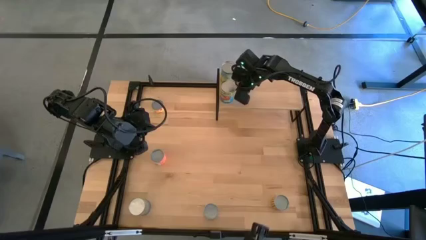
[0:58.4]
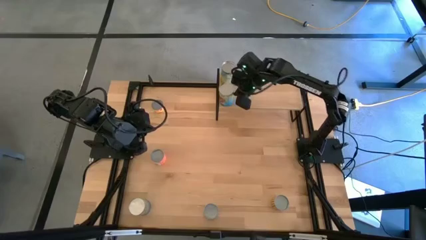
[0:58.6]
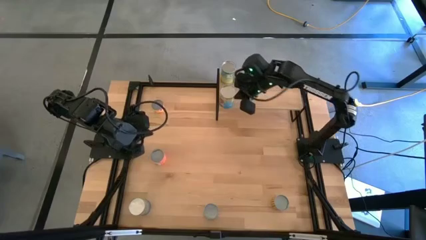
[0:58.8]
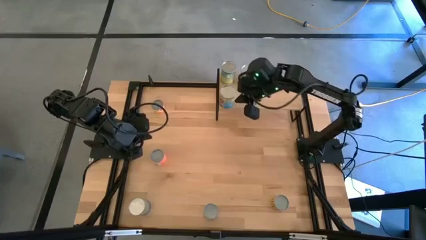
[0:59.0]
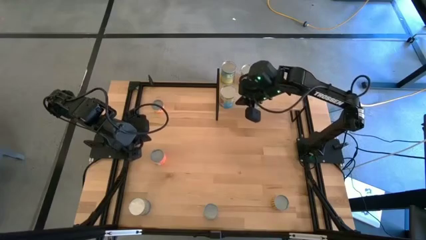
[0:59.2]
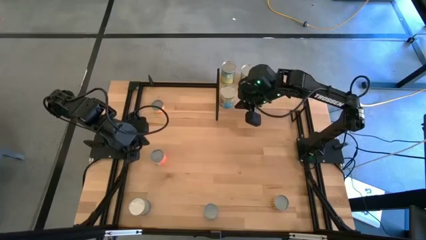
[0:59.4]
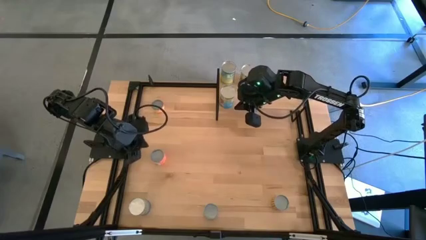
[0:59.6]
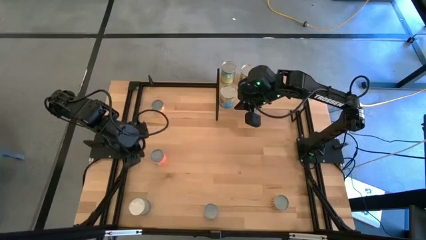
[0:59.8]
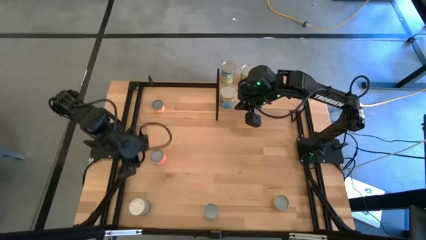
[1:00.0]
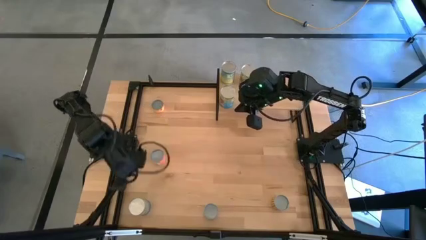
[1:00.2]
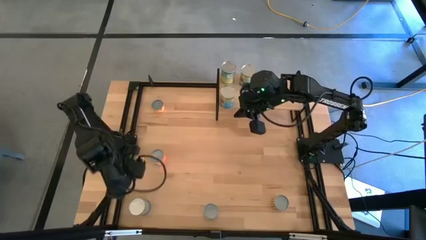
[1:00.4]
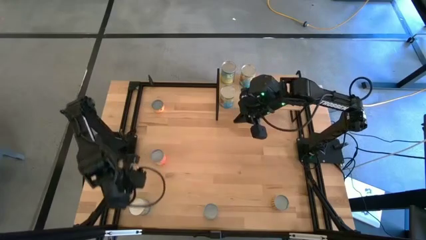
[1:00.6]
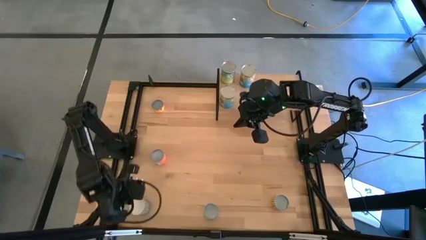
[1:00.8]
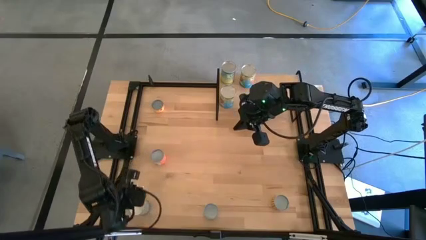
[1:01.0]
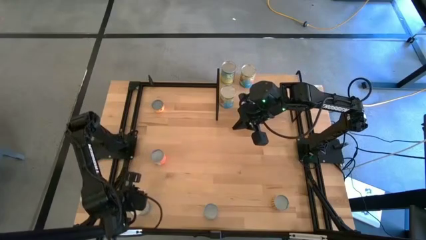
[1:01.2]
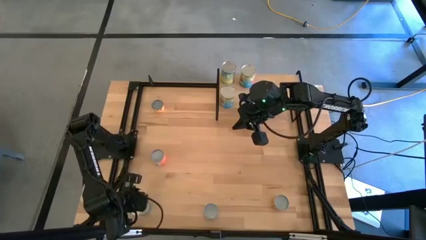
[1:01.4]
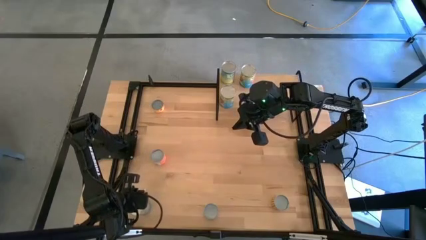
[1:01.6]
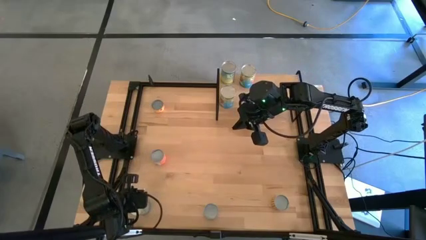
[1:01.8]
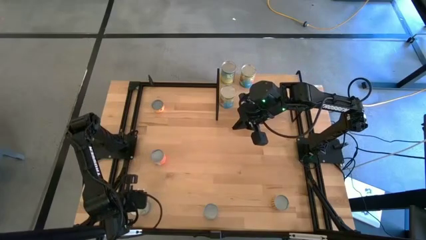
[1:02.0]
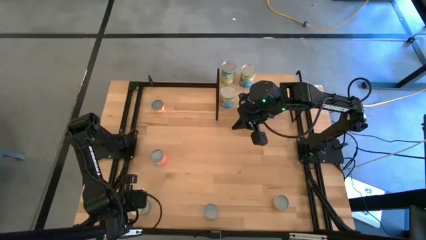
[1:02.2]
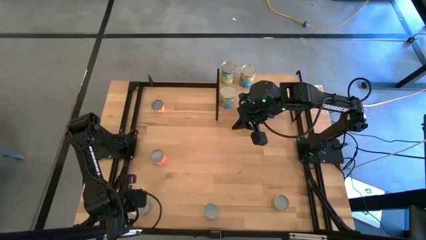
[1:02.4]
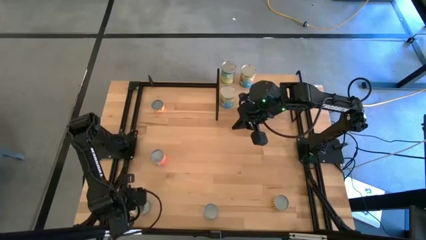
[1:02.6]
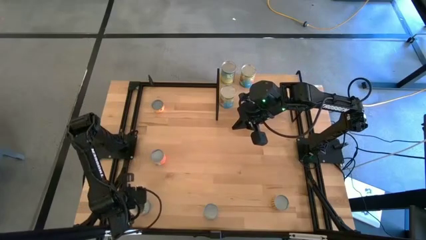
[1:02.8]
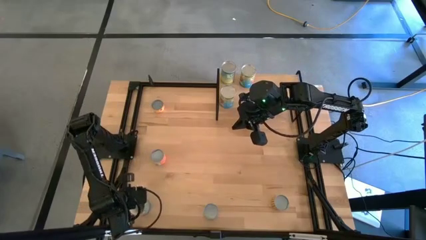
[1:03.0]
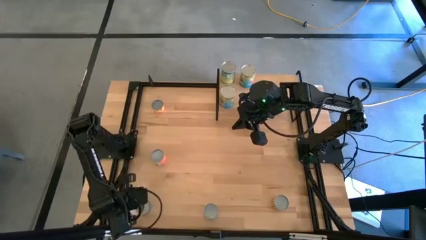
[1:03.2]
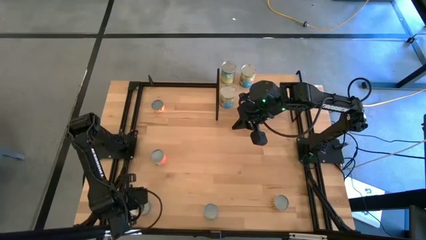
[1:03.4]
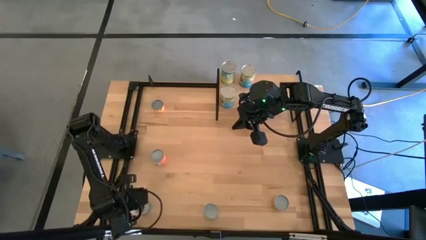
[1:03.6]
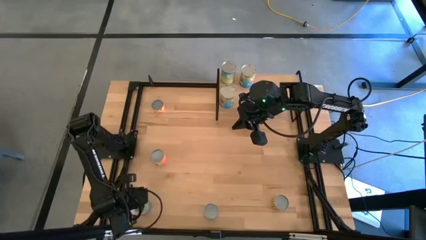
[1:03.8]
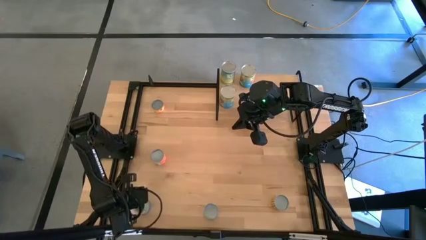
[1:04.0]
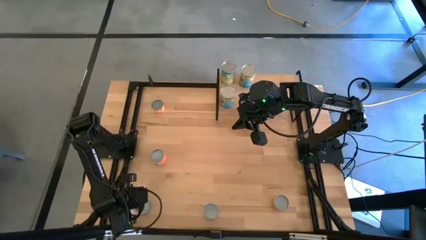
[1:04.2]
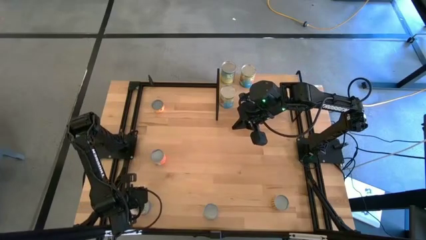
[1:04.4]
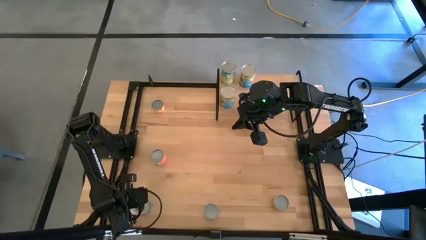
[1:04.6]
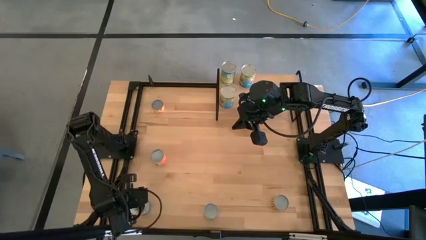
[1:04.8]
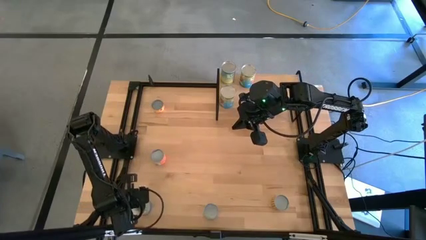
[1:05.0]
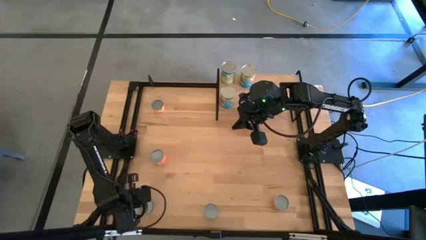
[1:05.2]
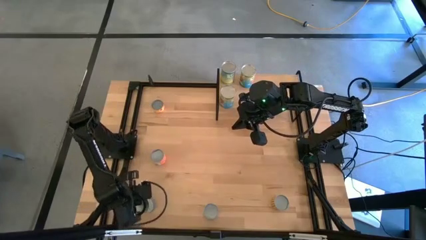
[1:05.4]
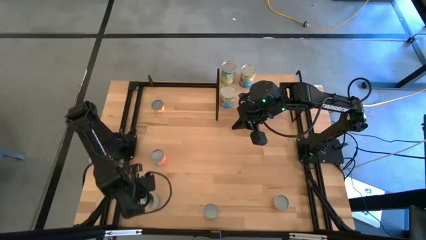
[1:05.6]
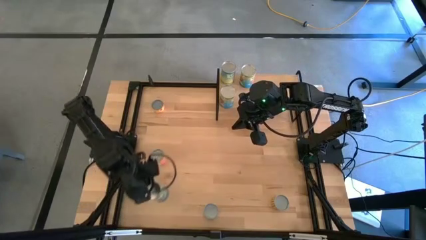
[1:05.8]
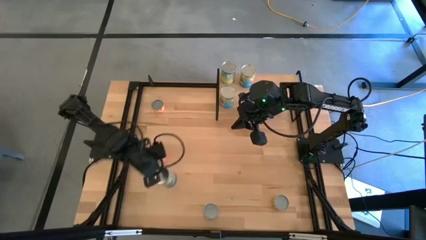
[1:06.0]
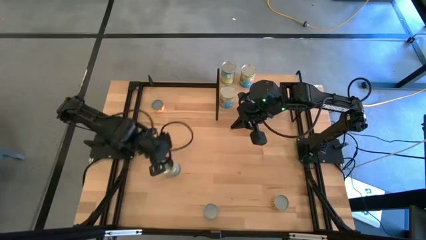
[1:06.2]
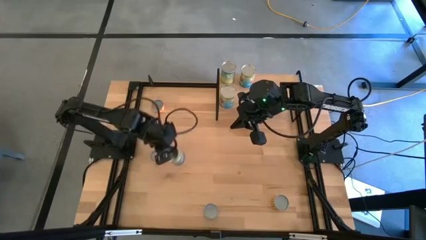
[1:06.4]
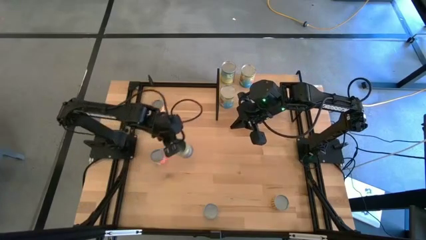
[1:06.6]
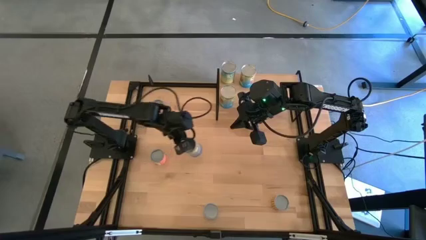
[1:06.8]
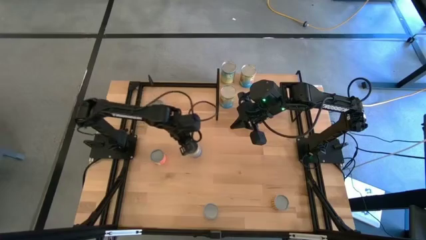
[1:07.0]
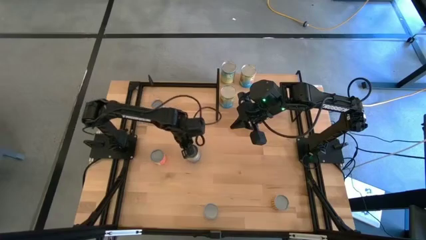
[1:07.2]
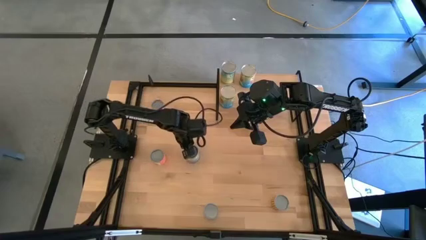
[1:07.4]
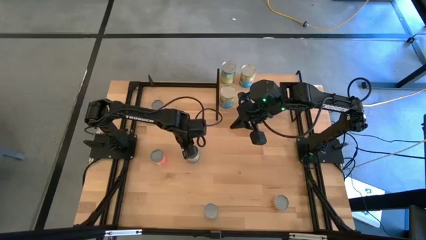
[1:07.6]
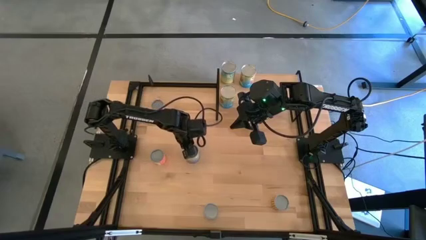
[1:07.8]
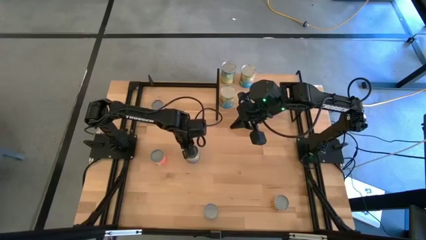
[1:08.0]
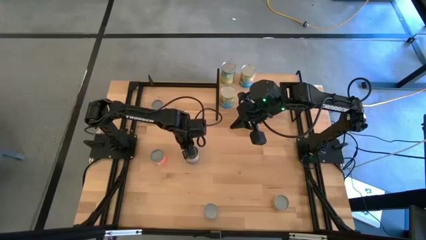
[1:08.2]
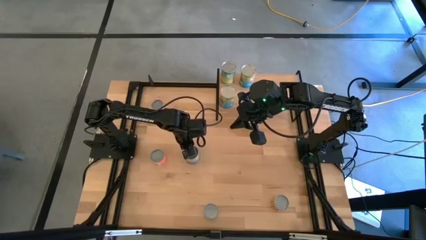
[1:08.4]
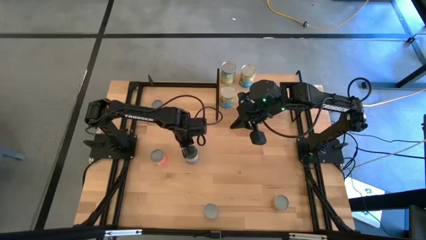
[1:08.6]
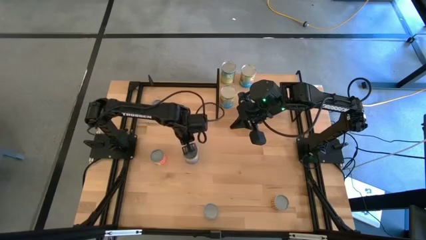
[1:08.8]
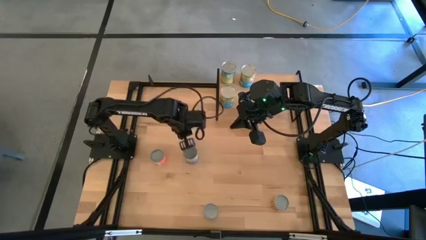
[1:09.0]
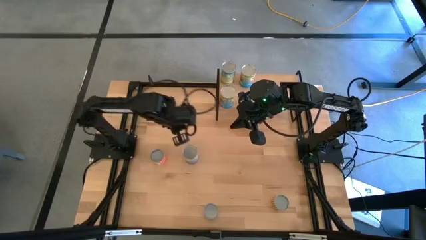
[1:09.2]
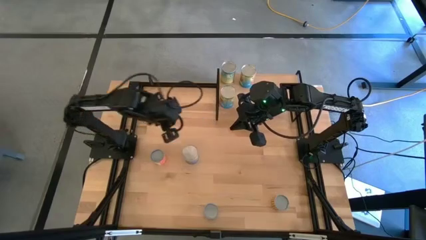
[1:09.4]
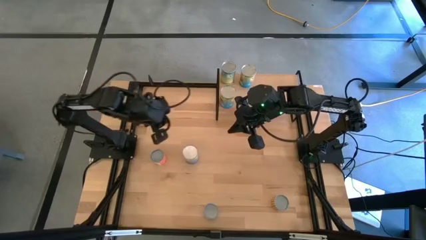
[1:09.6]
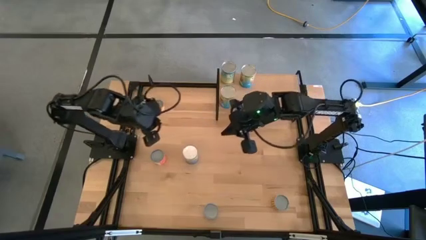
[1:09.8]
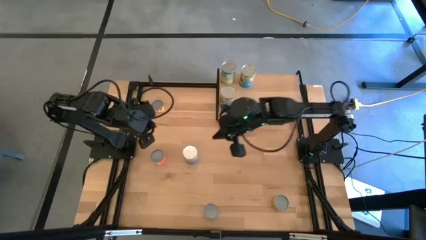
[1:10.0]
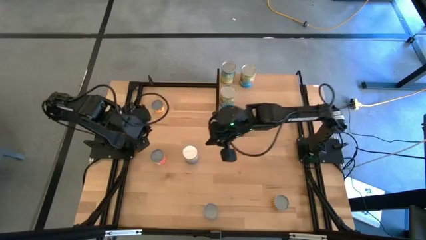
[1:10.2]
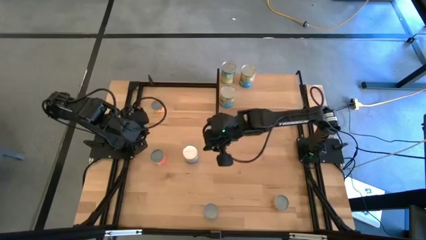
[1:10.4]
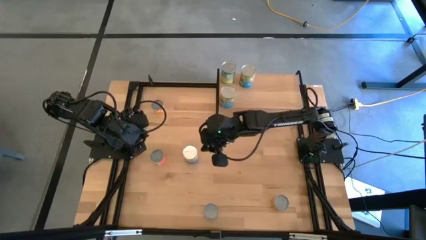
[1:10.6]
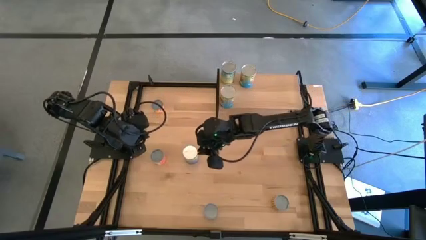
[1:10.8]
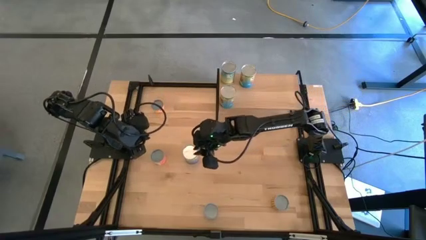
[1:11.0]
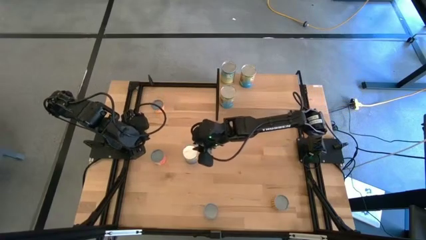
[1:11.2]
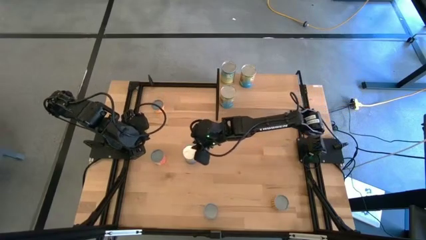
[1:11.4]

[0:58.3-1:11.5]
Task: Pick and place cans onto a shelf
Put the canned peas on the shelf
